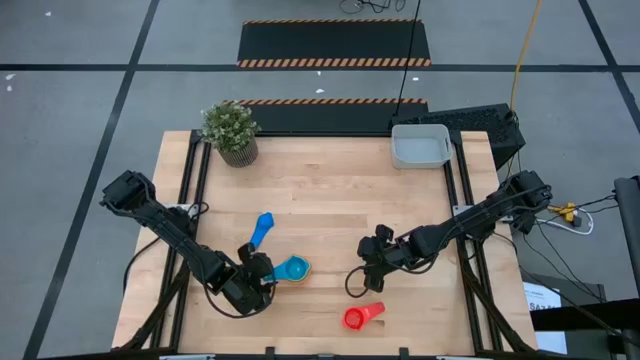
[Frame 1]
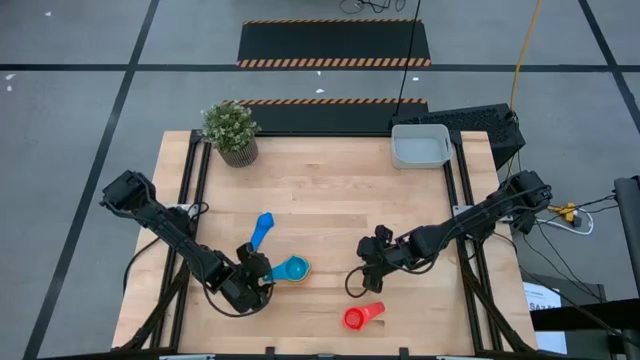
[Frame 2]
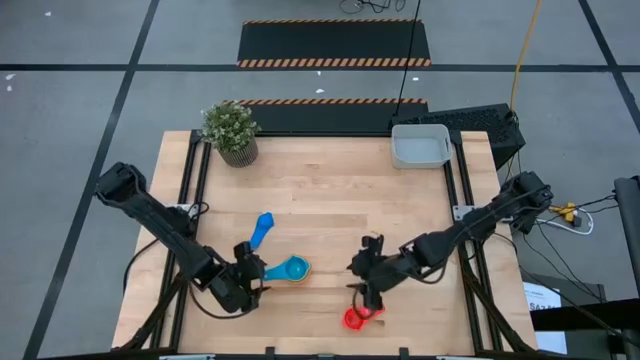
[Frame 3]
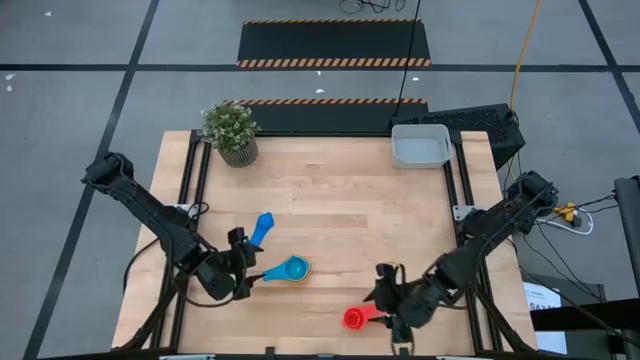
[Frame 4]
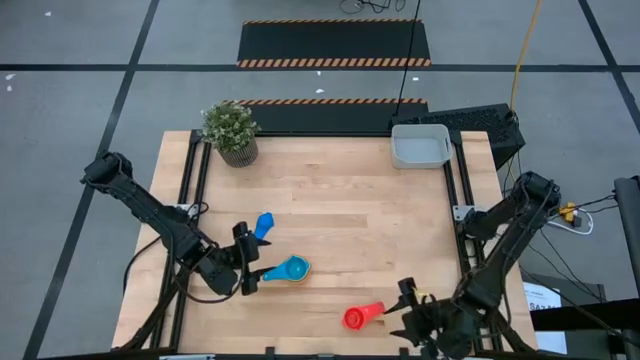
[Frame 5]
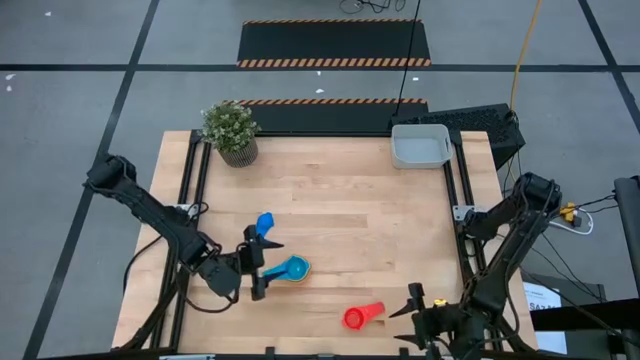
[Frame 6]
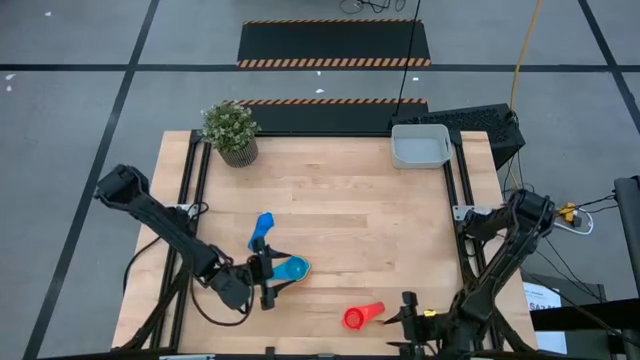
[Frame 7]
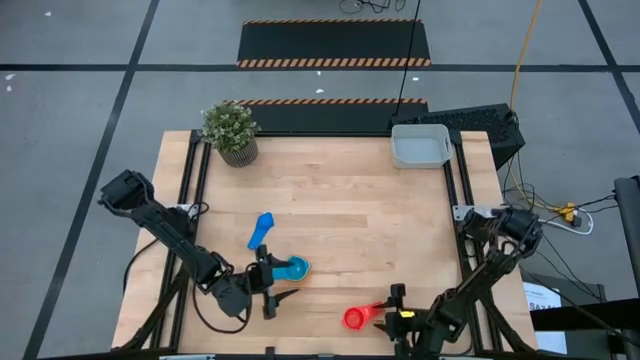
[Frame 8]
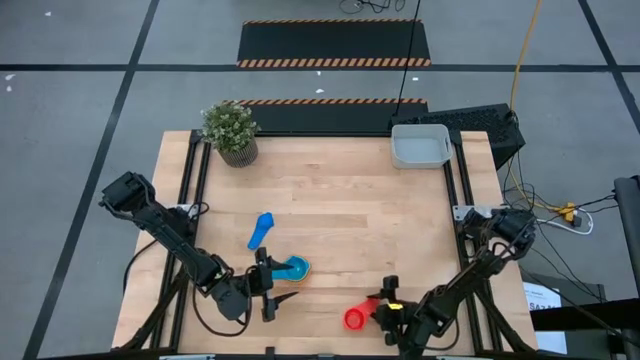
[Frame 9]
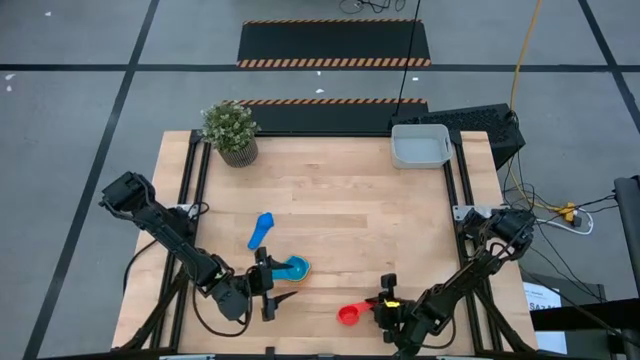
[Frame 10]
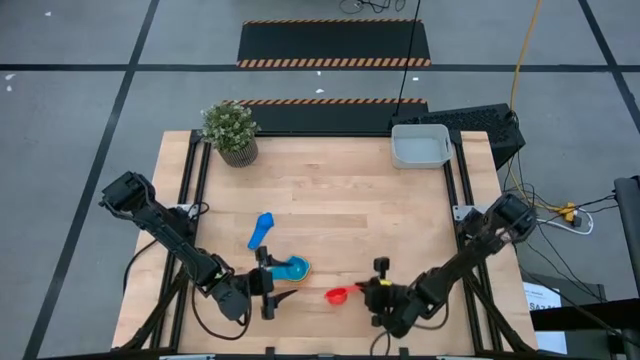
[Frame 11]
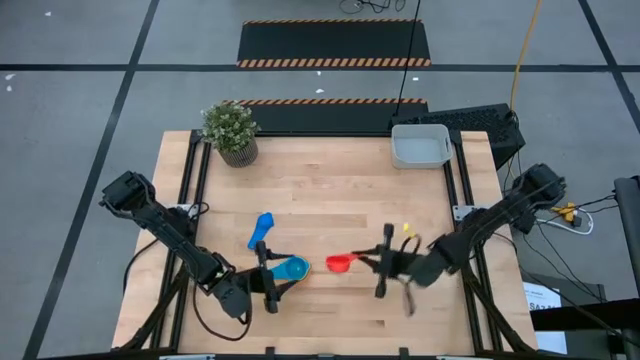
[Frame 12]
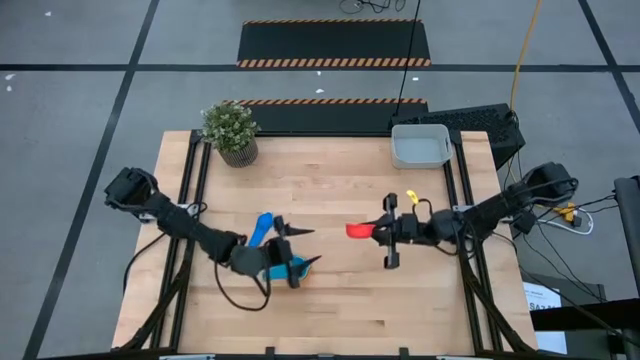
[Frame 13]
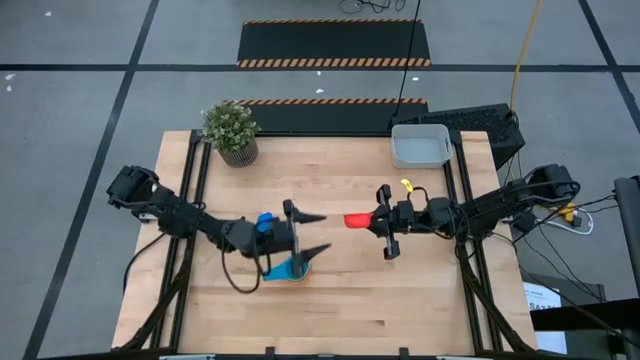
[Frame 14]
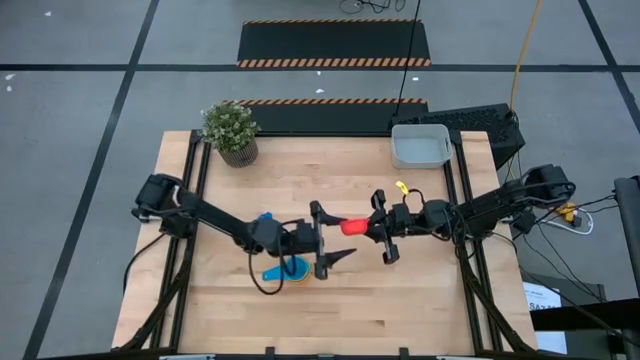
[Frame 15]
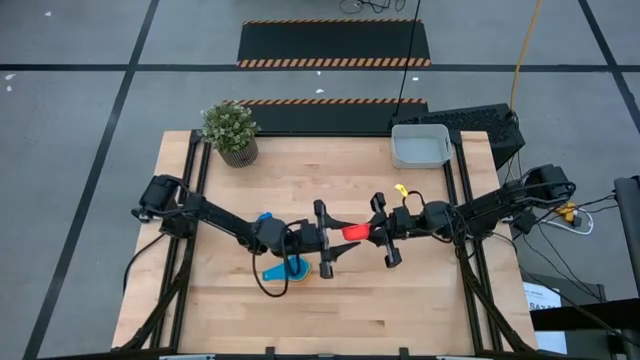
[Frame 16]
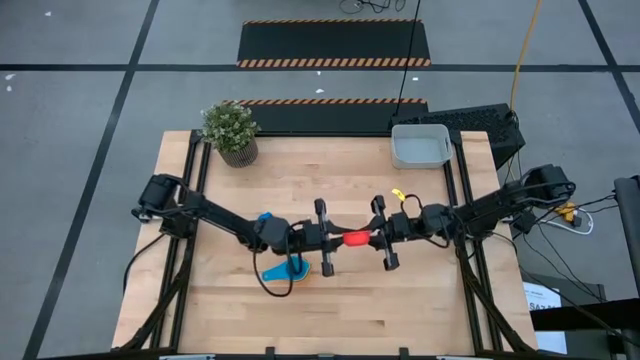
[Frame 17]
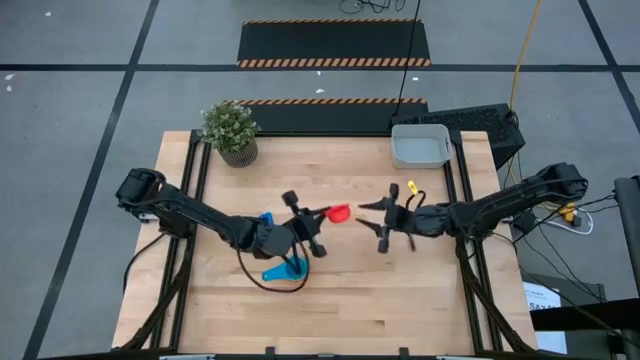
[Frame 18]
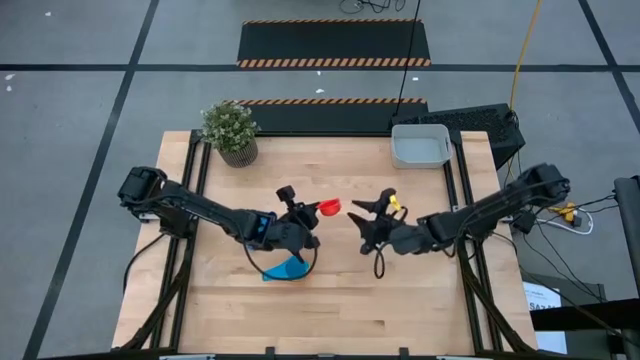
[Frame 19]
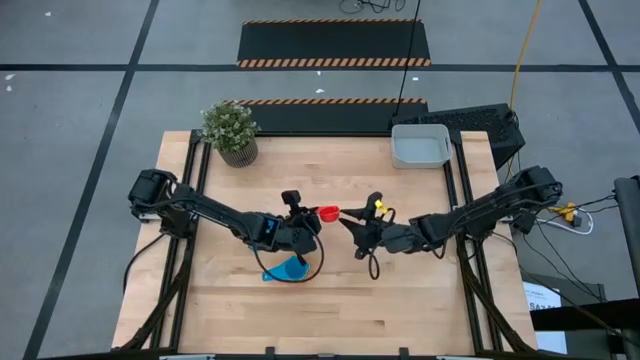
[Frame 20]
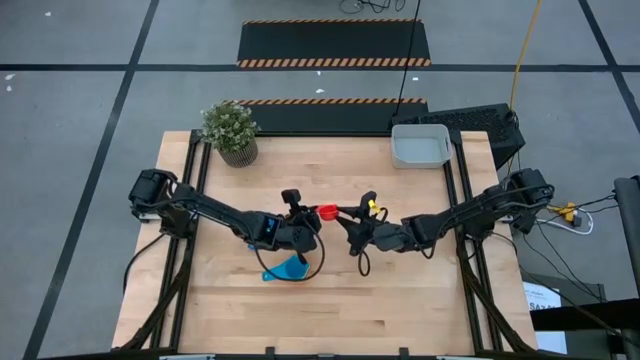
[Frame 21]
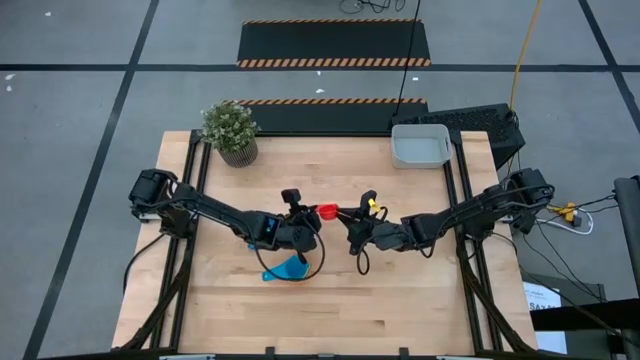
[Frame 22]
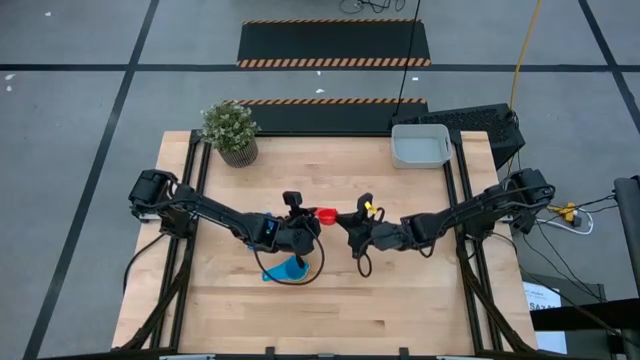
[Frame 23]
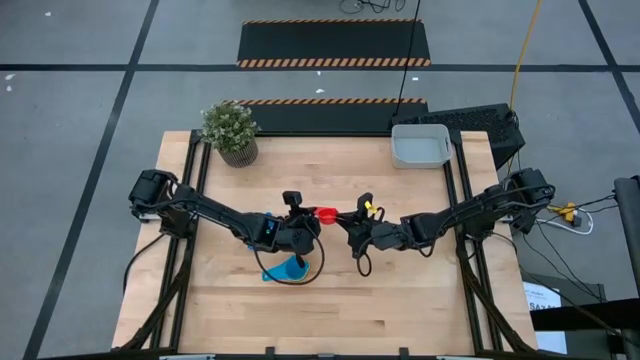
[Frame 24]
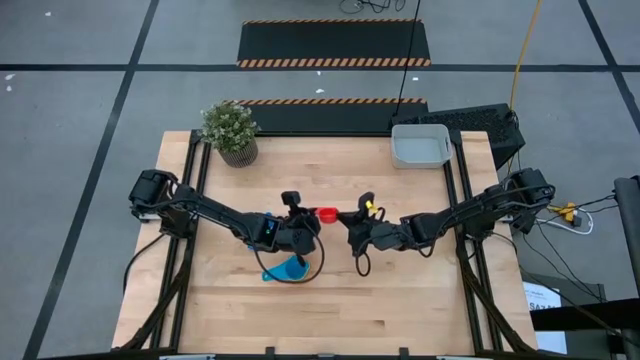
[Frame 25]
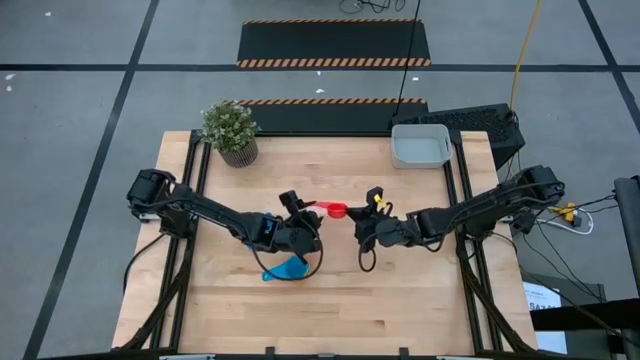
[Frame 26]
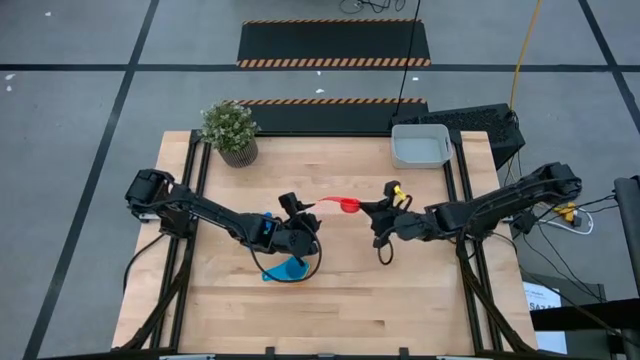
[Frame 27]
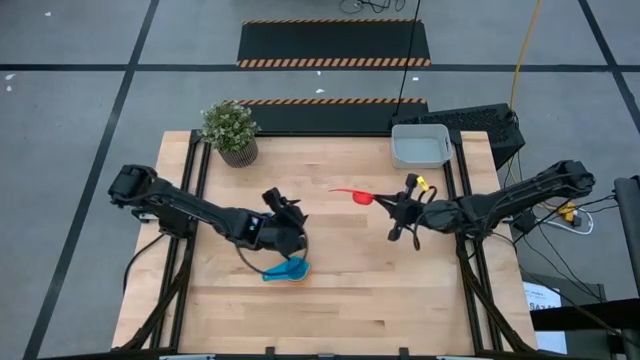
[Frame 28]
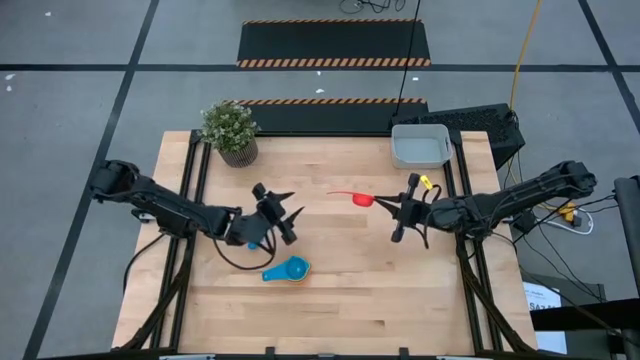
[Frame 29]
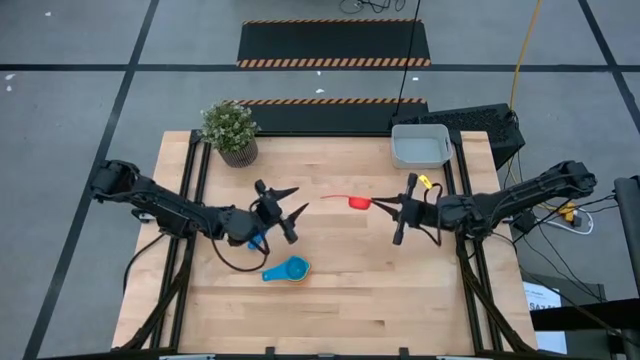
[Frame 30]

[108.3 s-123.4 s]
Task: Nest measuring cups in basket
Stack the red measuring cup on the light blue measuring cup

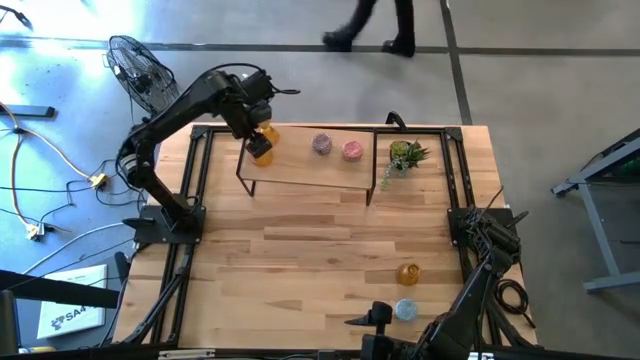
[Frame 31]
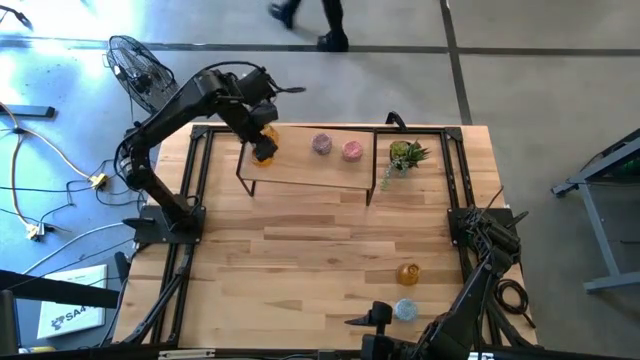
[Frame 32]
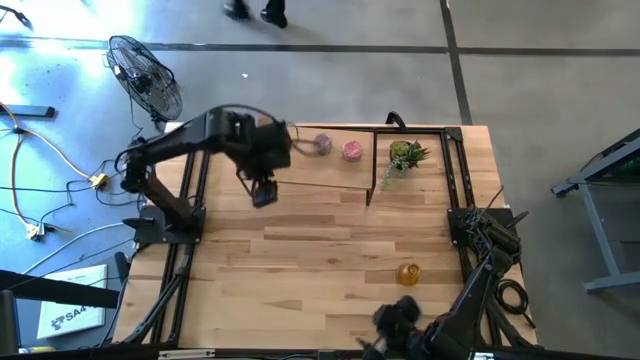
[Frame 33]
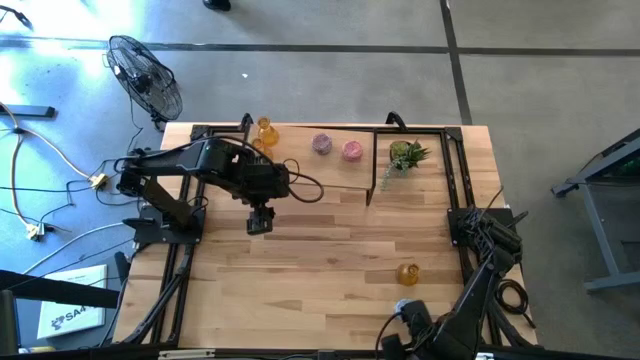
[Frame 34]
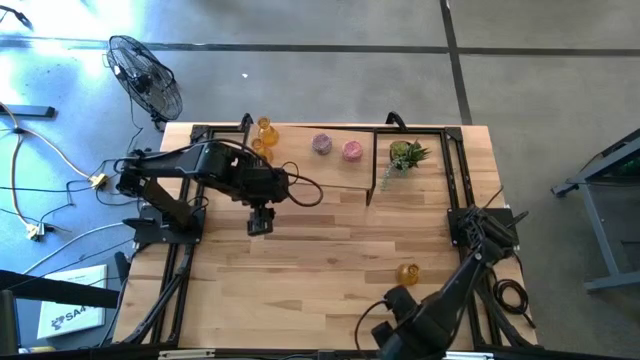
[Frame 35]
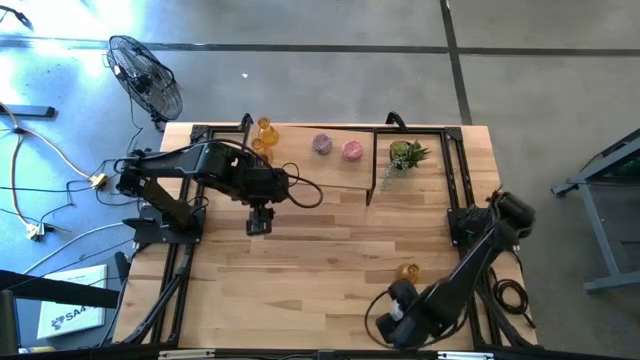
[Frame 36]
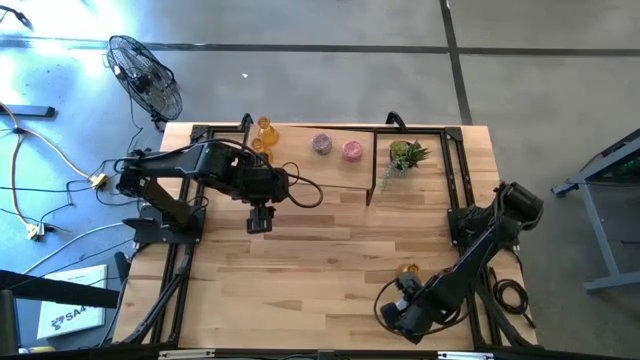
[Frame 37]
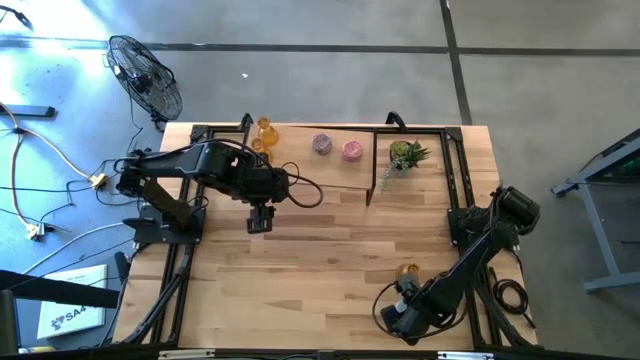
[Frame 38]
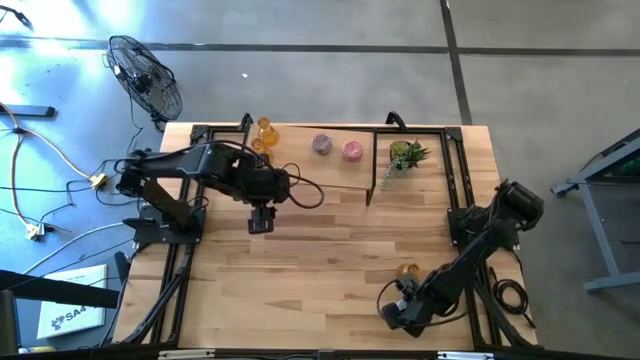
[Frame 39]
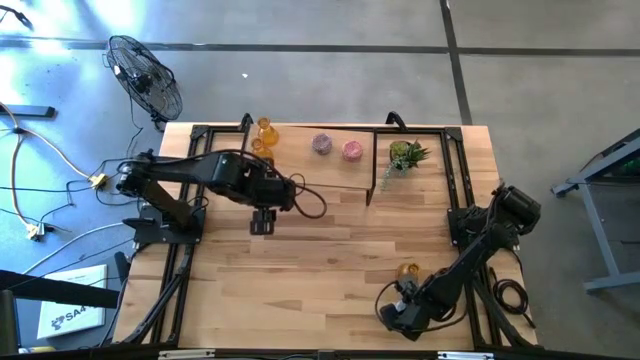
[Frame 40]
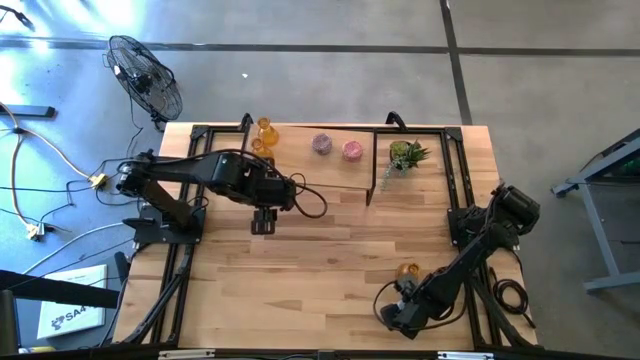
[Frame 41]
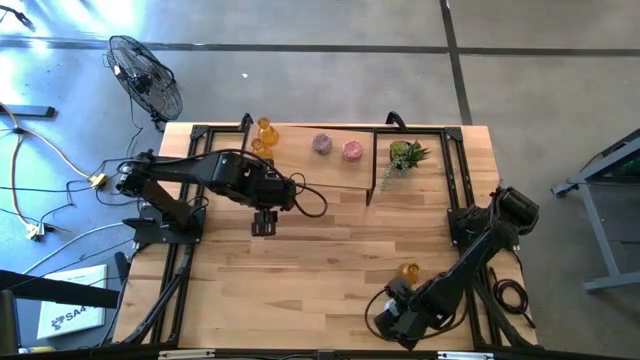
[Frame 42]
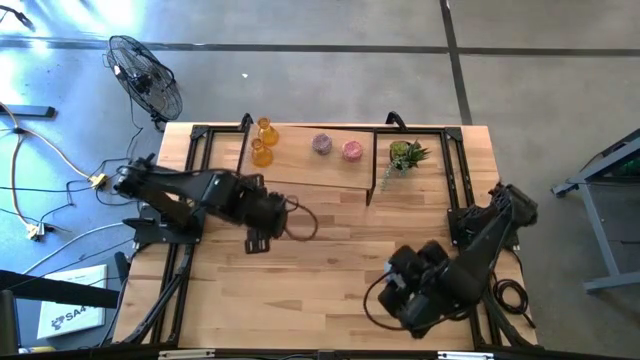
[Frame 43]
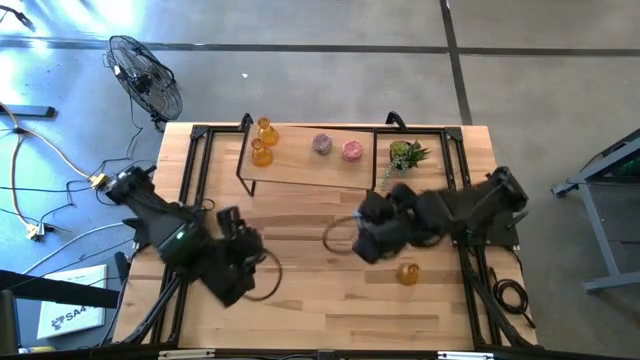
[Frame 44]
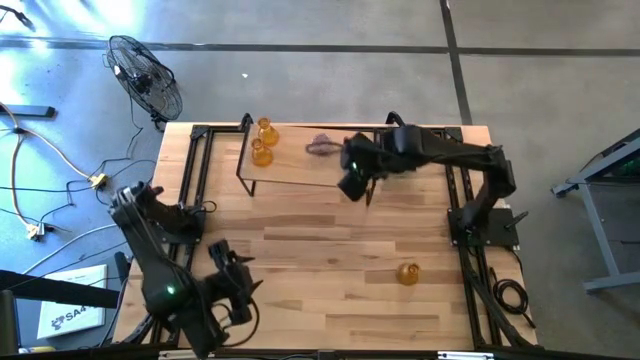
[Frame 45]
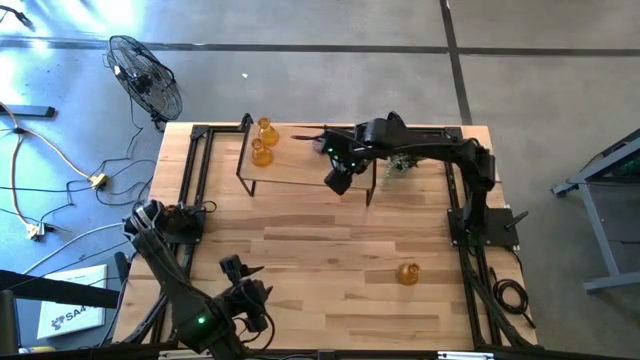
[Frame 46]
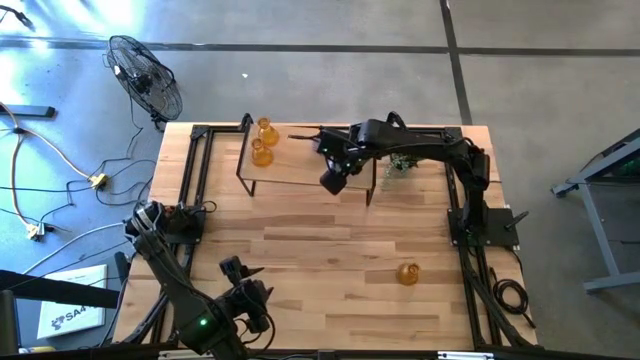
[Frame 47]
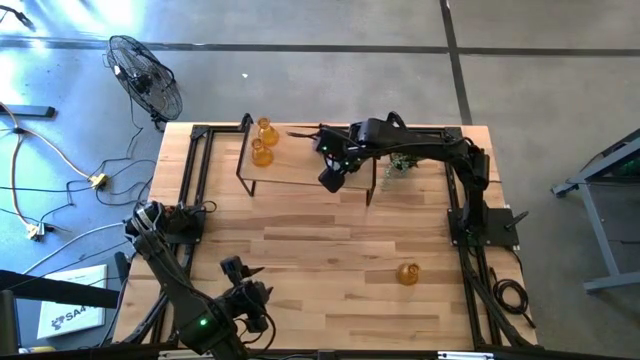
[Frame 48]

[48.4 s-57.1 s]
Task: Pick & Place candle stick holders
Put the blue scented candle on the shelf
